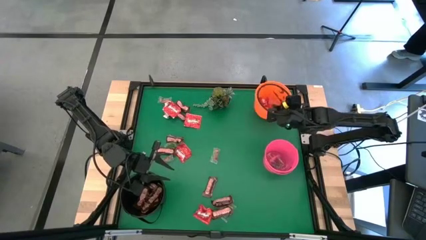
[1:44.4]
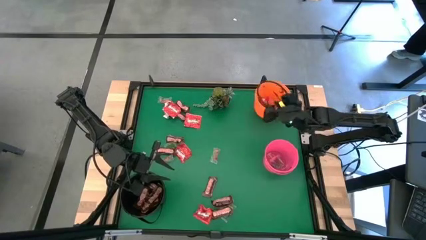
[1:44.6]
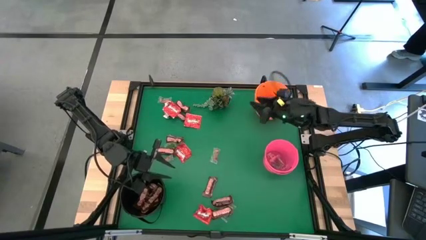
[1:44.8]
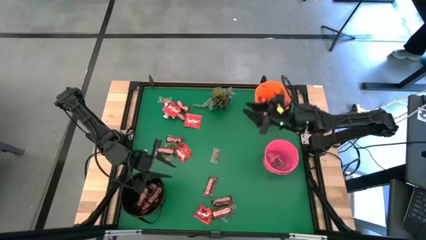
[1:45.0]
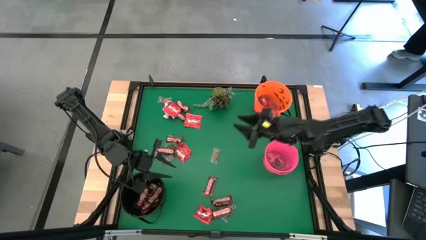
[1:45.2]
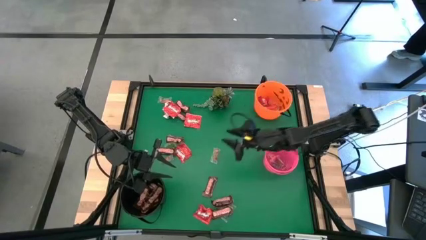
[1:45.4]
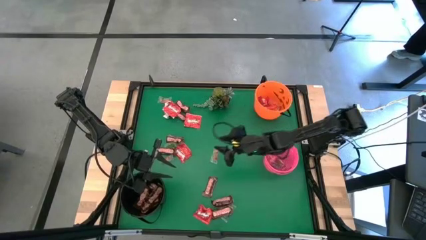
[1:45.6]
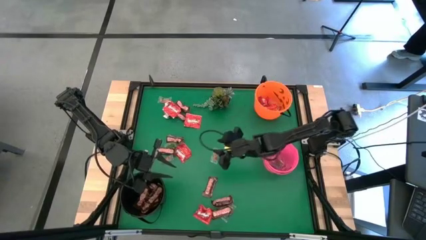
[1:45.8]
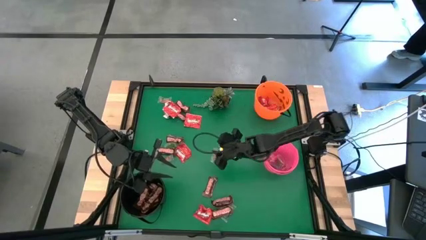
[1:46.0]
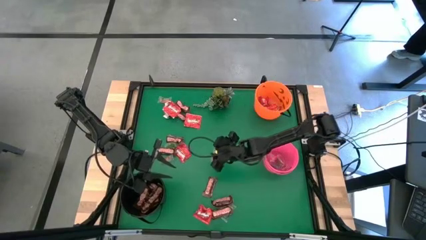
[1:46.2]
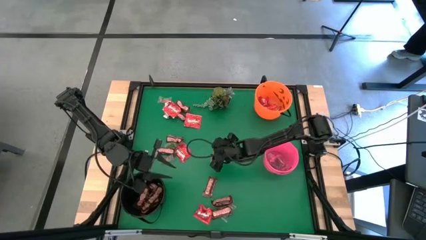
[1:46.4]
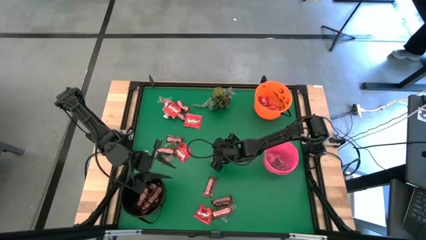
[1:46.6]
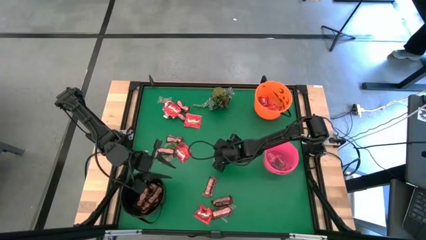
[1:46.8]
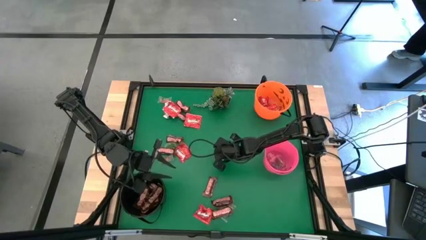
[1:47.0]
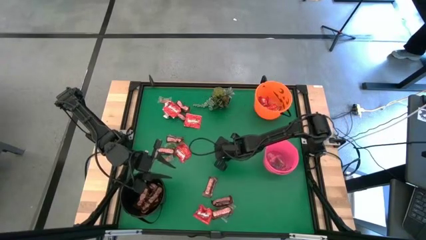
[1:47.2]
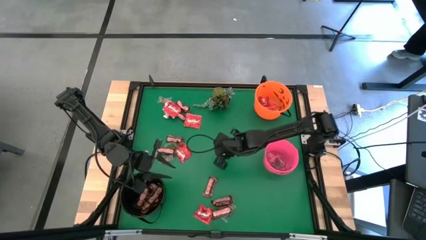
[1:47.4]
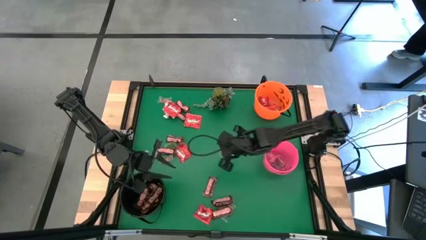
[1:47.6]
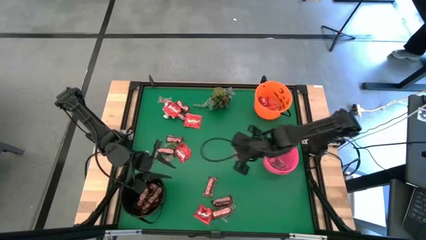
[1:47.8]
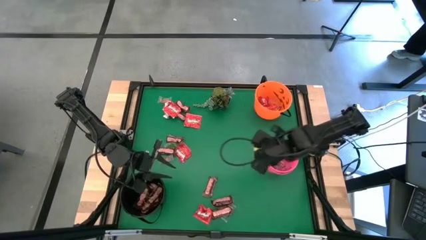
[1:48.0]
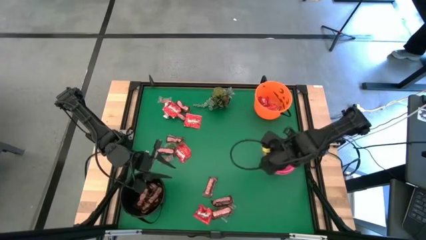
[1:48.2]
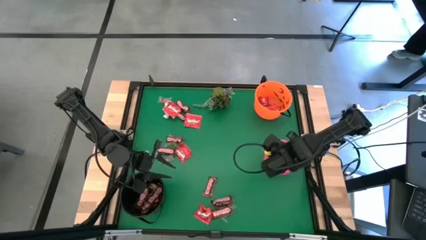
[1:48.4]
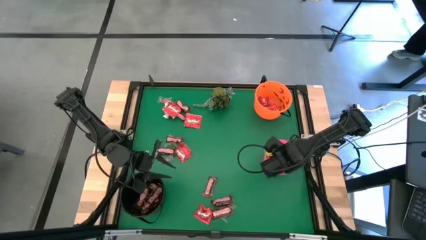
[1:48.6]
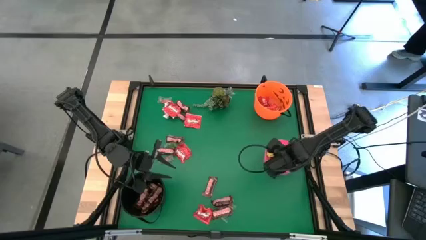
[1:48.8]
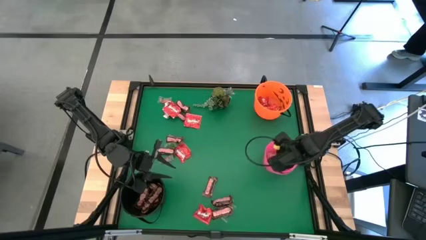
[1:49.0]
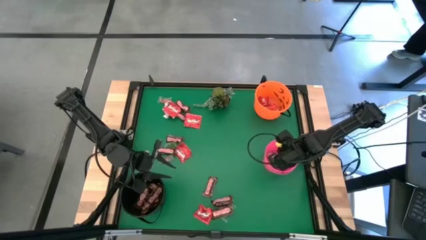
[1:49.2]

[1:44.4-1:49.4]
Task: Sort candy
Put the orange candy into the pink bucket

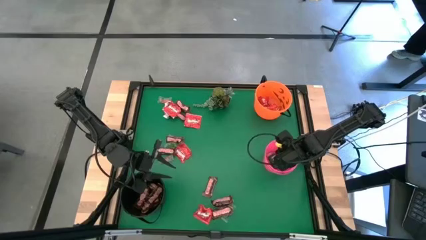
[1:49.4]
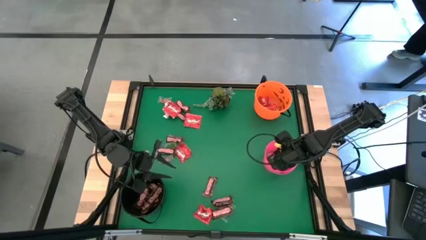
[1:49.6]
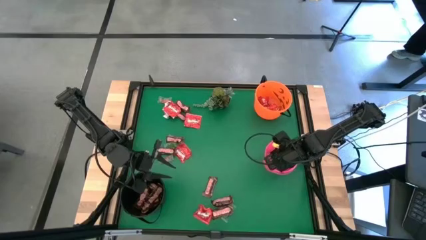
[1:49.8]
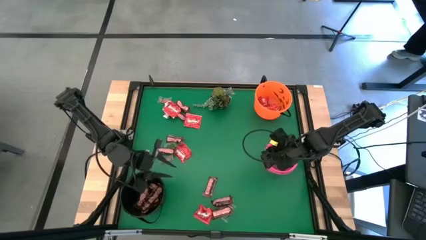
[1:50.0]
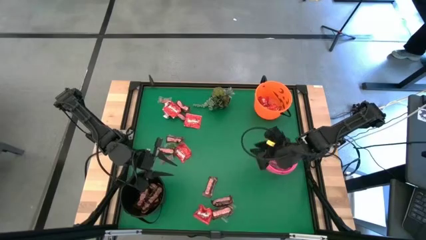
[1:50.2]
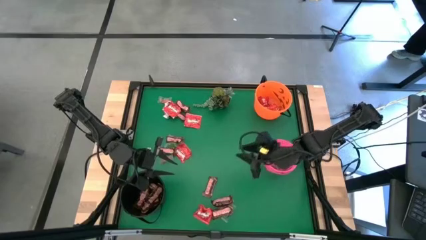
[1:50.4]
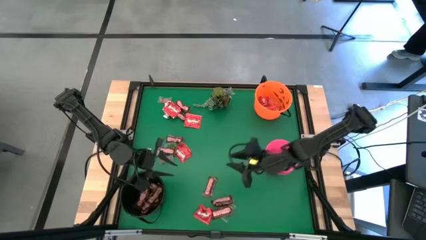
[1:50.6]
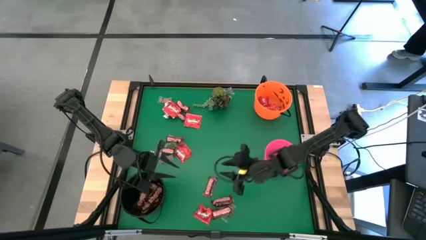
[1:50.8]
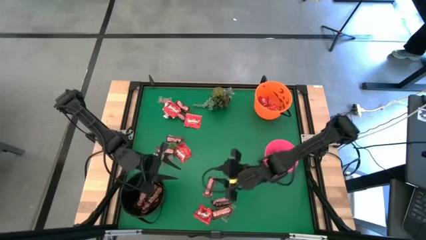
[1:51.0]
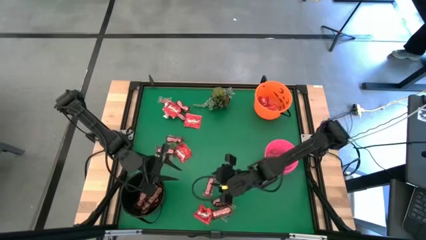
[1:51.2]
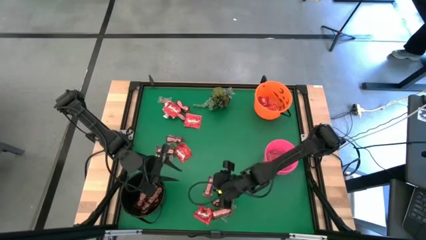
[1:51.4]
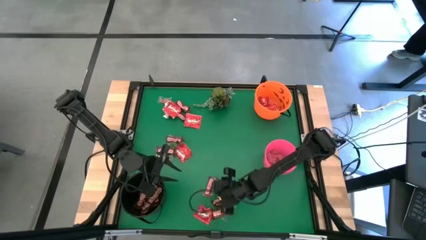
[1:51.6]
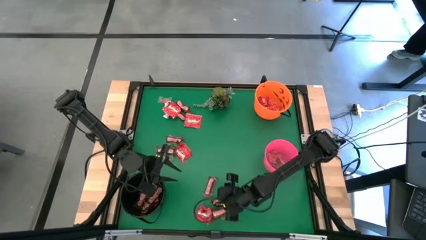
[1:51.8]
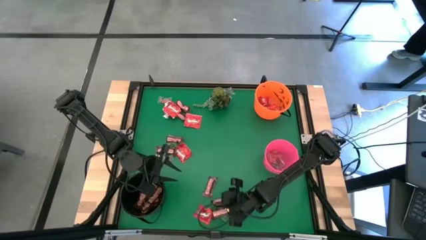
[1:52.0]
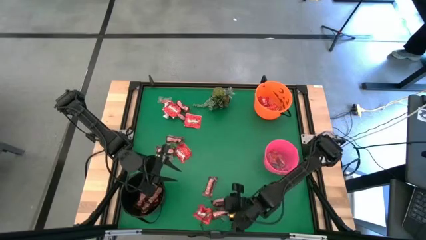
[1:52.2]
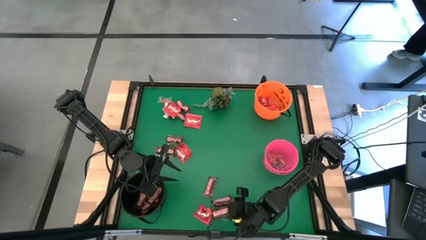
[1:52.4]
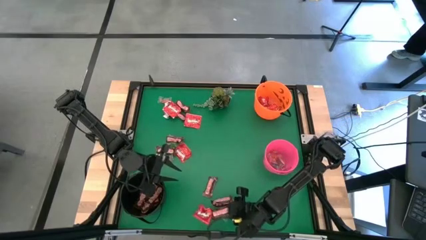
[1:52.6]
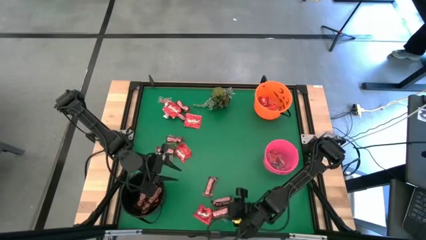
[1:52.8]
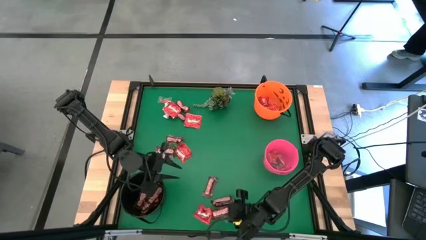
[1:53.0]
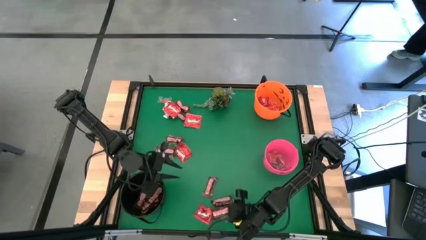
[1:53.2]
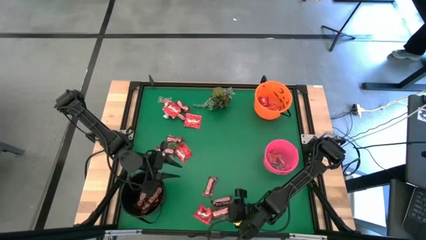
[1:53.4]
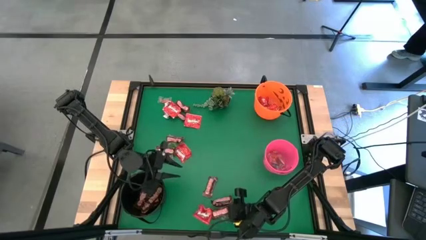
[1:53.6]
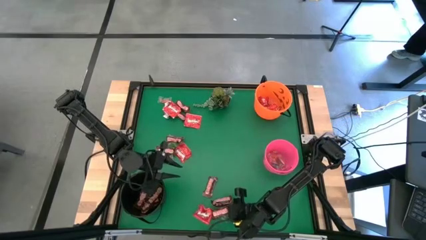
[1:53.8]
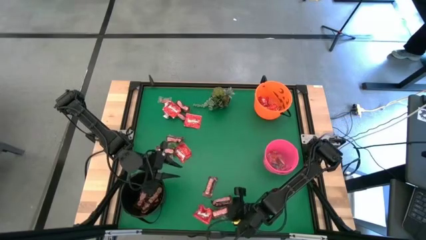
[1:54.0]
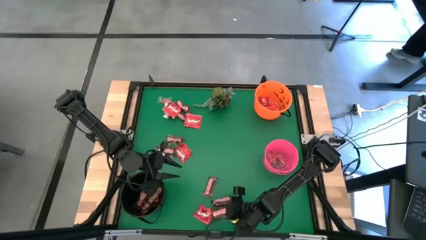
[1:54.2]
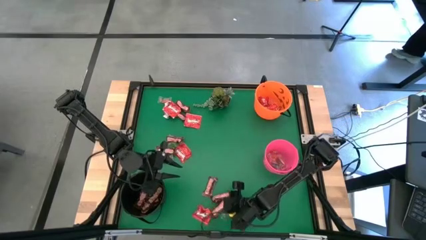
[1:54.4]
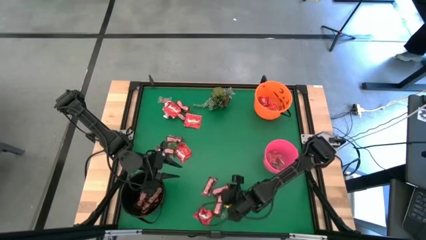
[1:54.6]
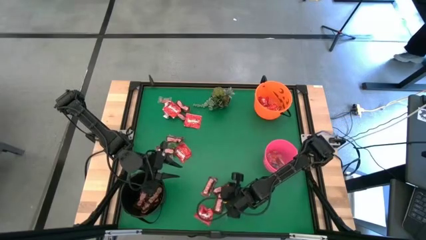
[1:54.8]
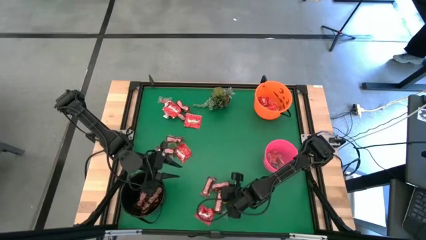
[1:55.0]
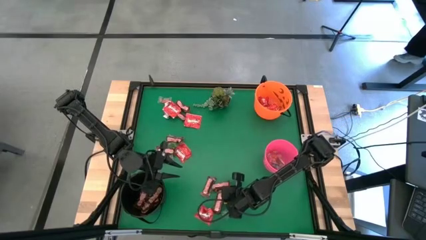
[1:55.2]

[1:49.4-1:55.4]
Put the brown chocolate bar into the black bucket

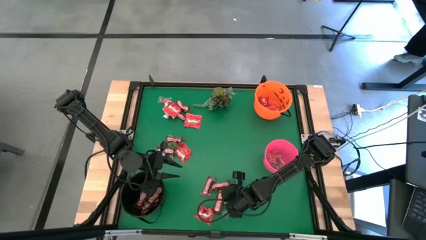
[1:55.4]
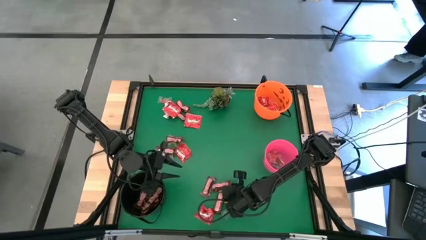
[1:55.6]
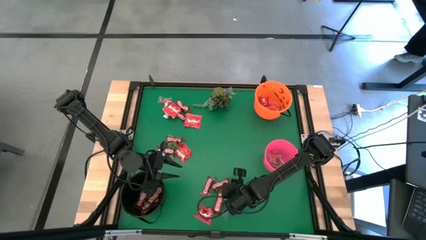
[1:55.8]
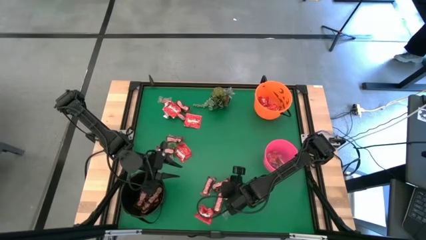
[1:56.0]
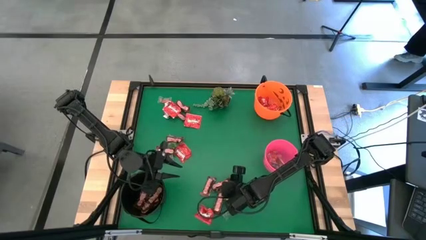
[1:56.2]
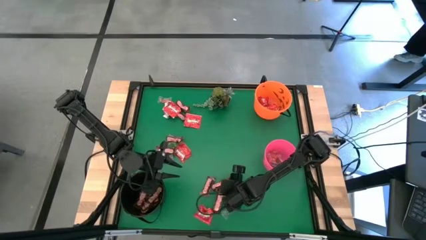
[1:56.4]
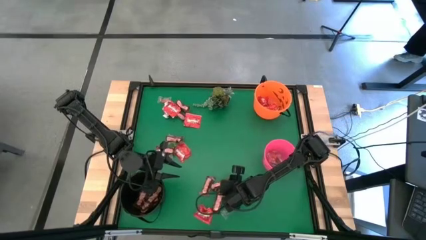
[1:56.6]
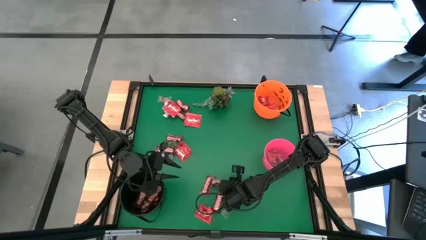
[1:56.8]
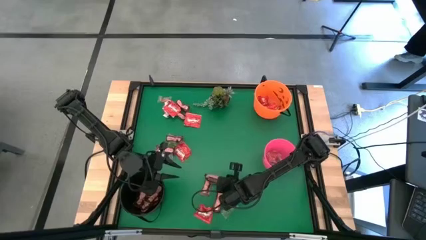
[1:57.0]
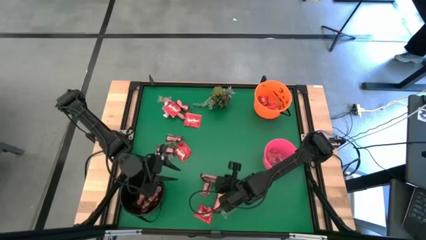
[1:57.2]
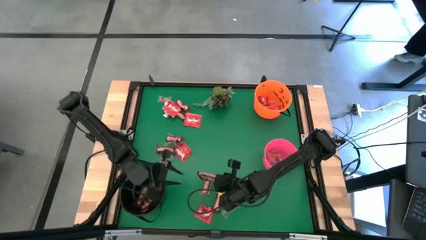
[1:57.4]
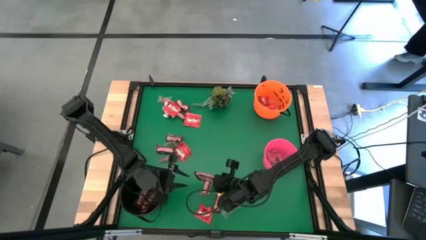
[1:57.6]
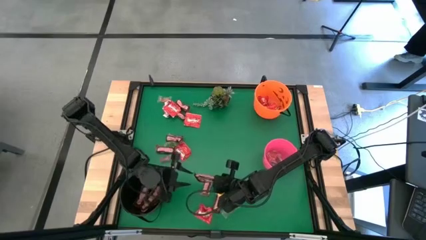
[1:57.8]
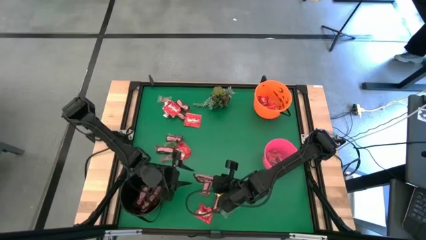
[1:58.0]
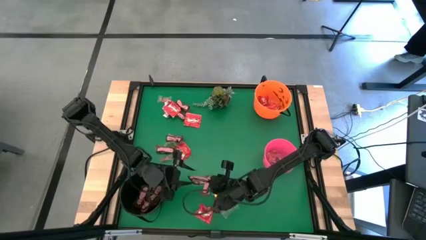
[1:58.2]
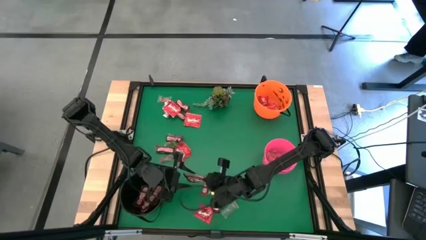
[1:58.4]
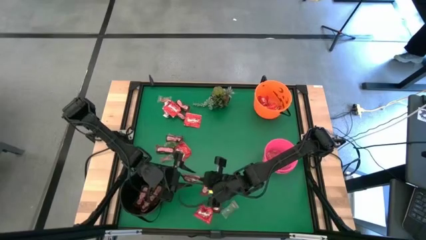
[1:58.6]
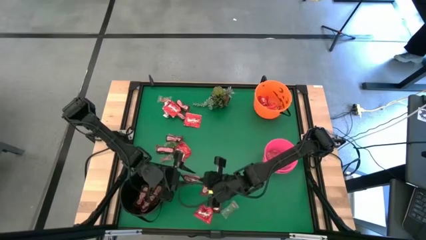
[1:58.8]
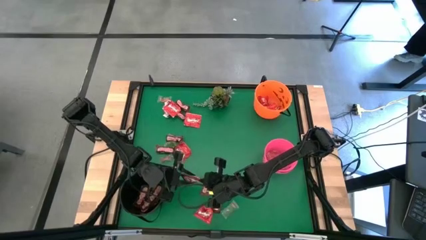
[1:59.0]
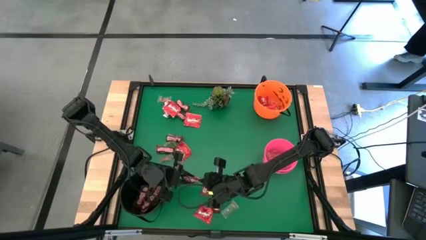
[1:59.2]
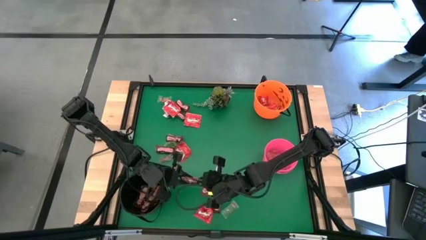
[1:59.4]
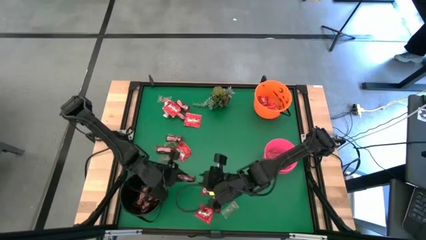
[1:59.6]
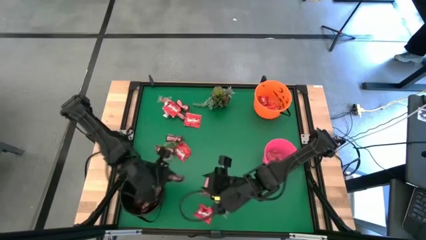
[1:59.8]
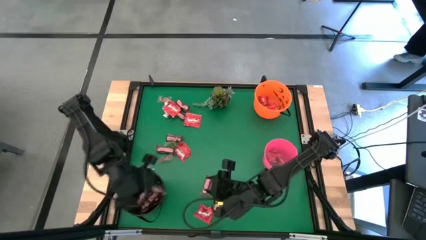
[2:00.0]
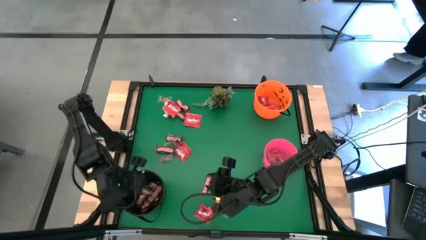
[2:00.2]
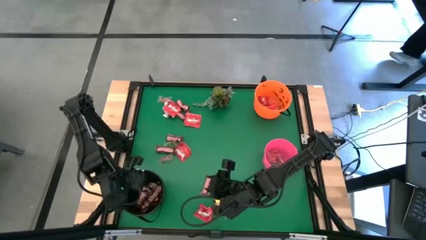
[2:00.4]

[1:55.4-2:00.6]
Put the brown chocolate bar into the black bucket

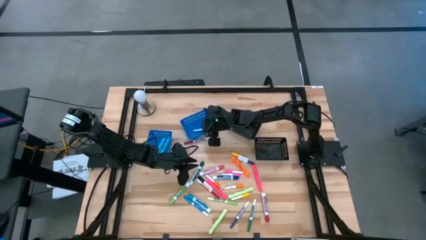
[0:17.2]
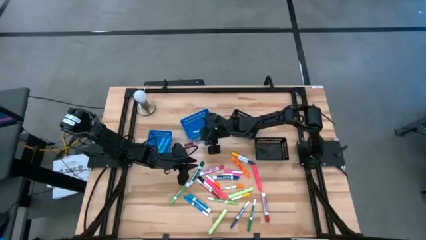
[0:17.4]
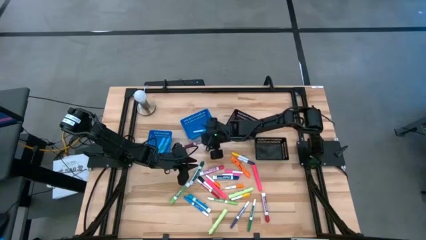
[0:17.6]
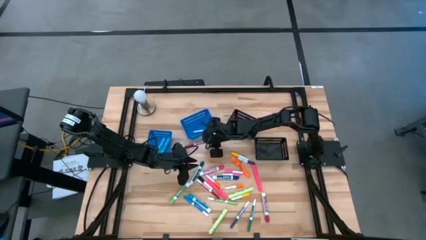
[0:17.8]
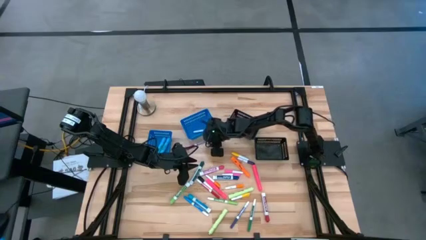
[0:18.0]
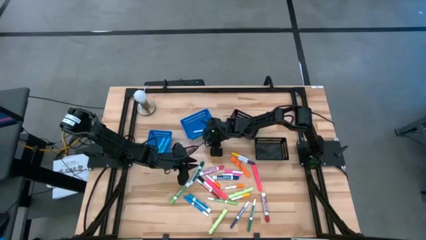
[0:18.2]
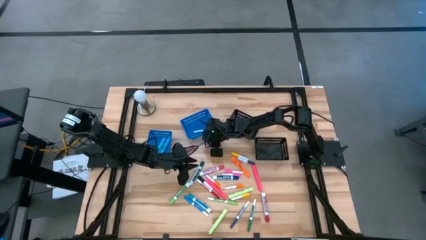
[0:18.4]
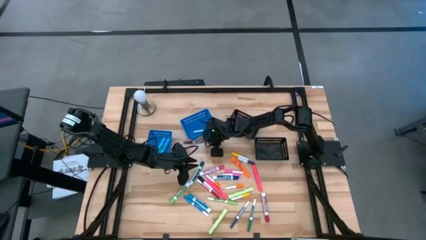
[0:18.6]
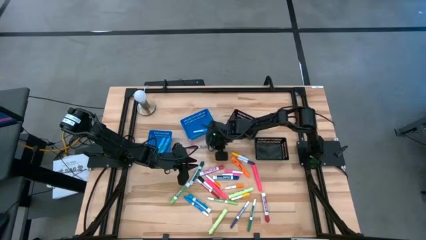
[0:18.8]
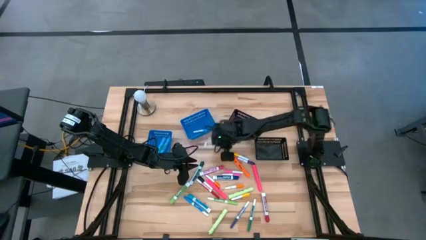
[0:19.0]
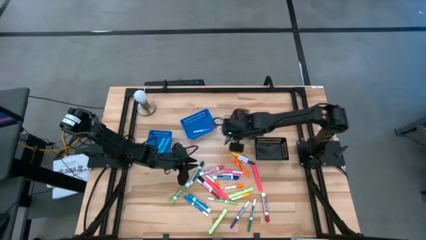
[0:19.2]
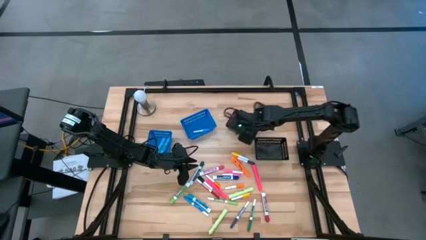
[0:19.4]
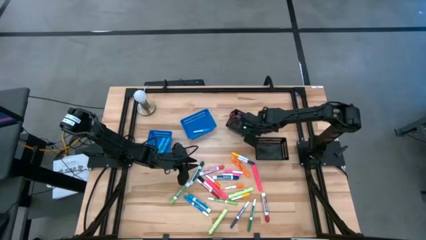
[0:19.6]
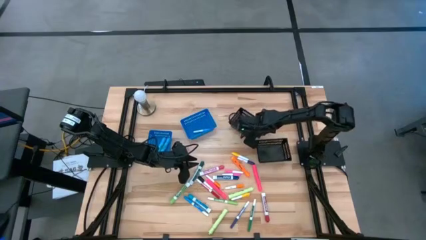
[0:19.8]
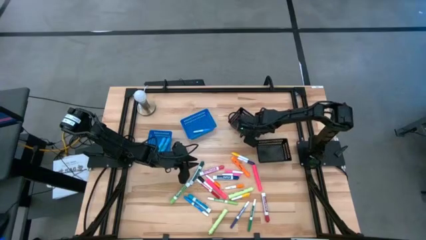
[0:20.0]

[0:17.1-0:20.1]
Task: Pick & Place Markers
Put the top purple marker pen into the top black bin
